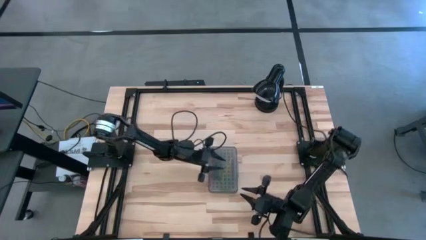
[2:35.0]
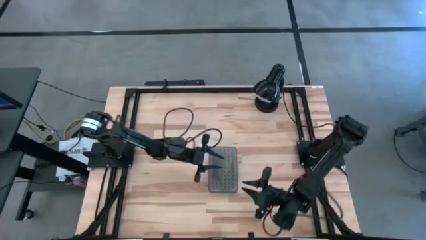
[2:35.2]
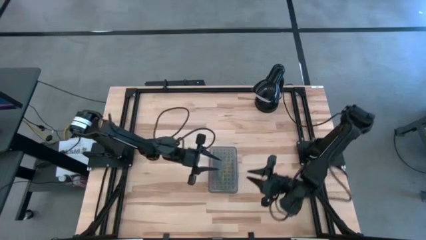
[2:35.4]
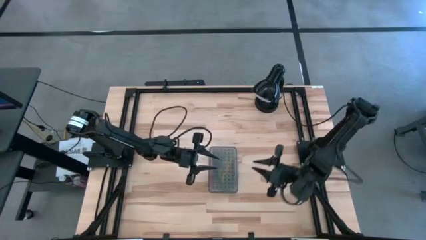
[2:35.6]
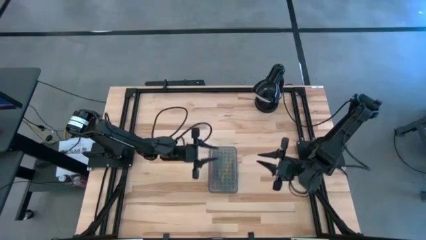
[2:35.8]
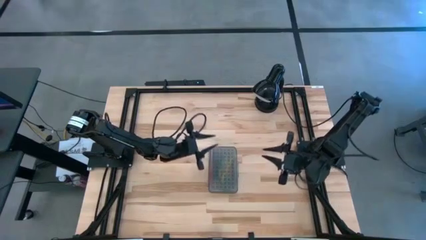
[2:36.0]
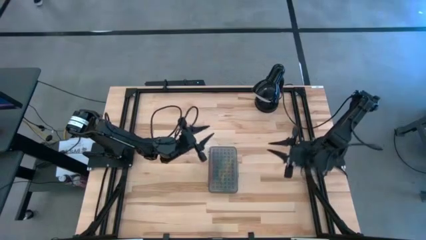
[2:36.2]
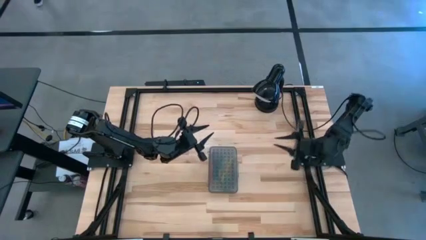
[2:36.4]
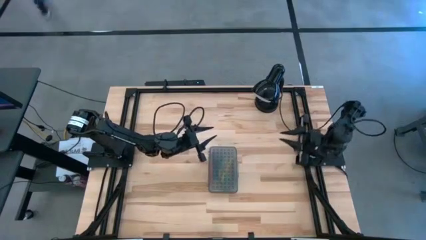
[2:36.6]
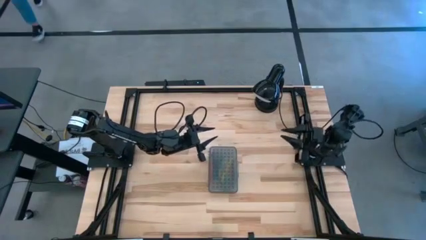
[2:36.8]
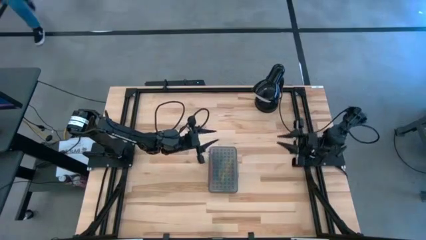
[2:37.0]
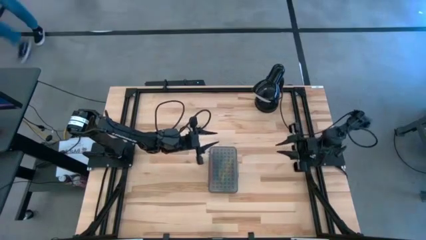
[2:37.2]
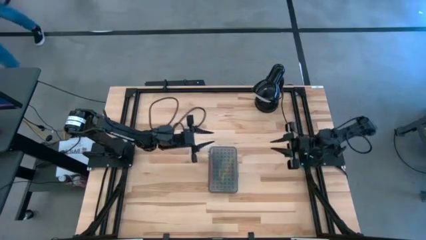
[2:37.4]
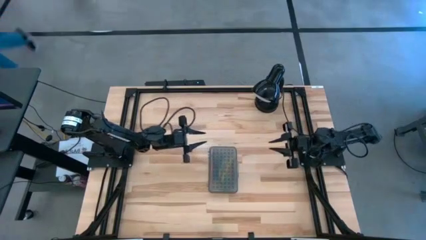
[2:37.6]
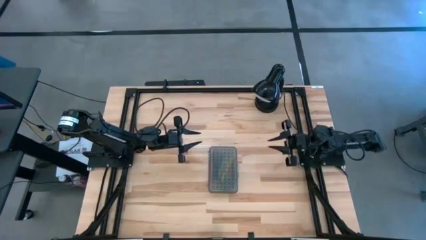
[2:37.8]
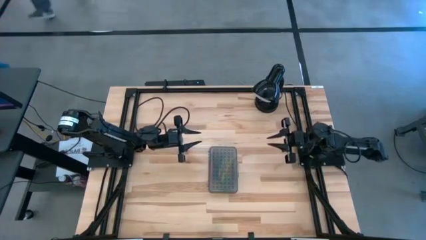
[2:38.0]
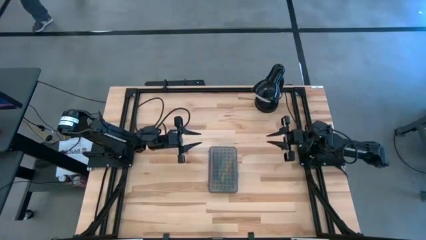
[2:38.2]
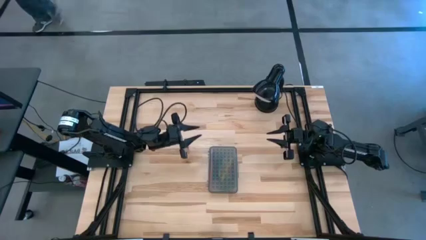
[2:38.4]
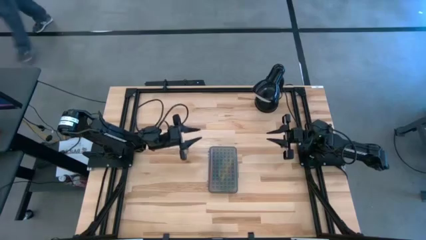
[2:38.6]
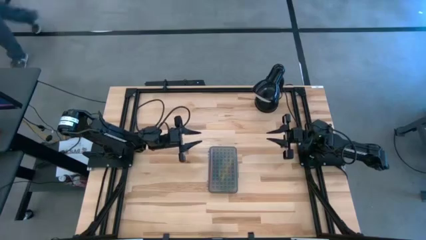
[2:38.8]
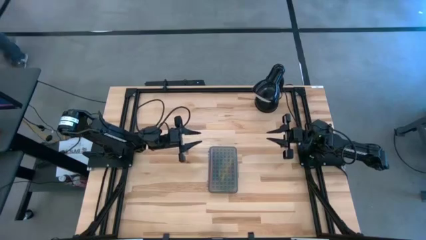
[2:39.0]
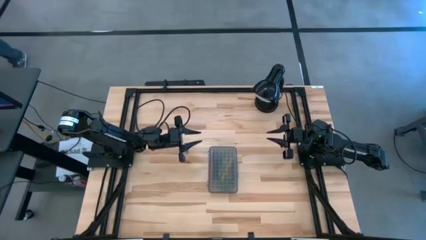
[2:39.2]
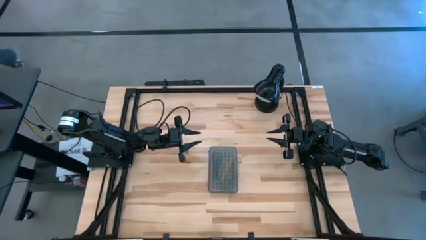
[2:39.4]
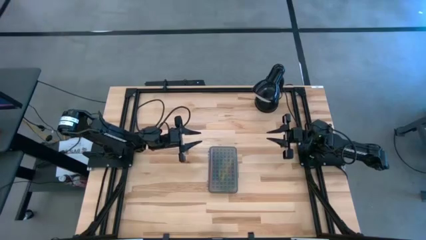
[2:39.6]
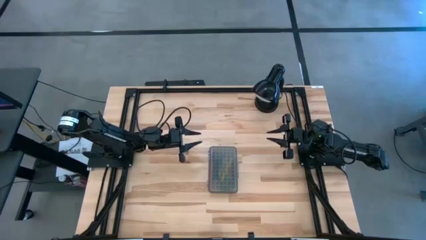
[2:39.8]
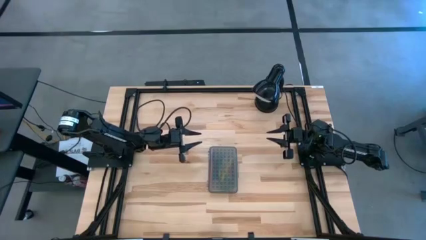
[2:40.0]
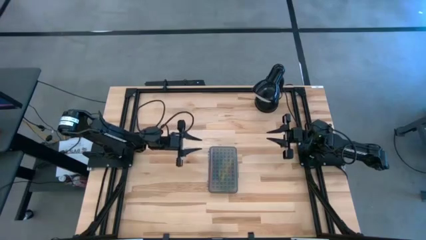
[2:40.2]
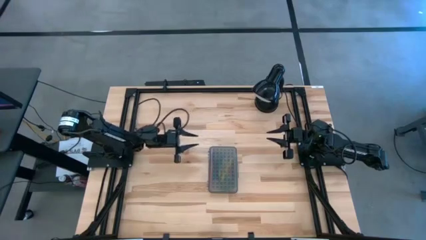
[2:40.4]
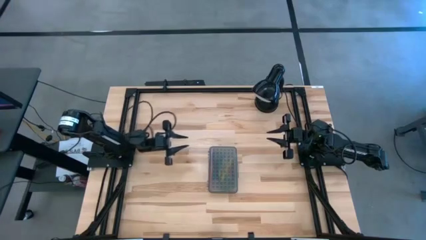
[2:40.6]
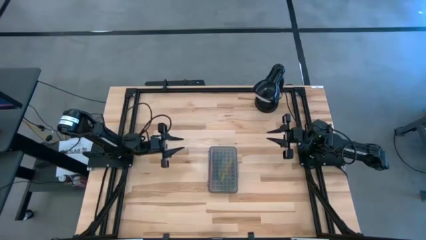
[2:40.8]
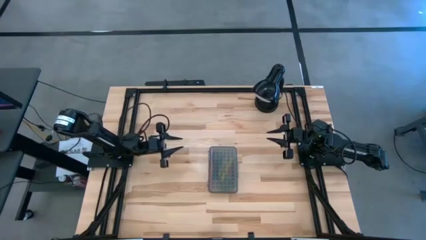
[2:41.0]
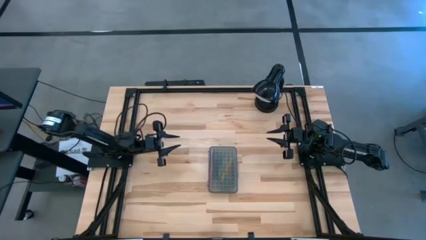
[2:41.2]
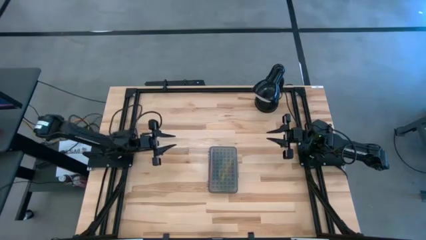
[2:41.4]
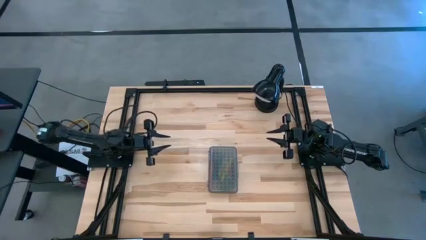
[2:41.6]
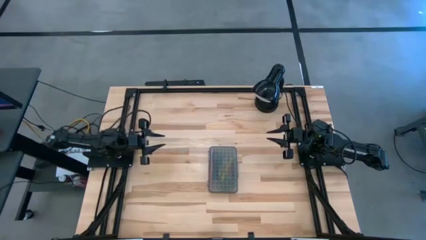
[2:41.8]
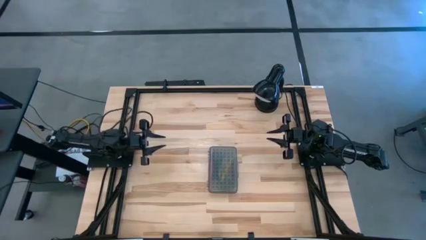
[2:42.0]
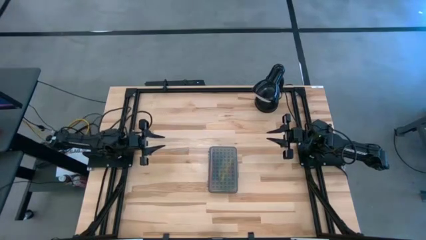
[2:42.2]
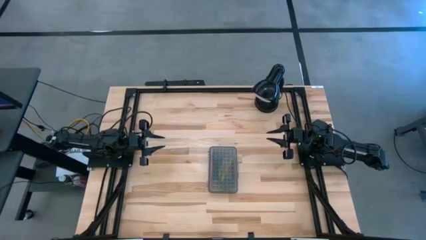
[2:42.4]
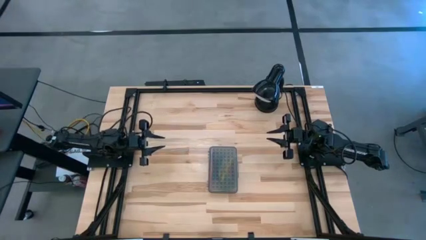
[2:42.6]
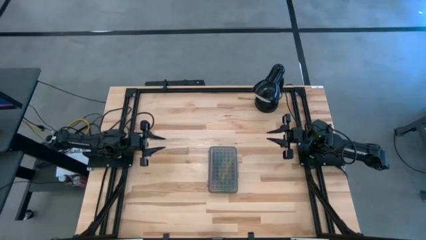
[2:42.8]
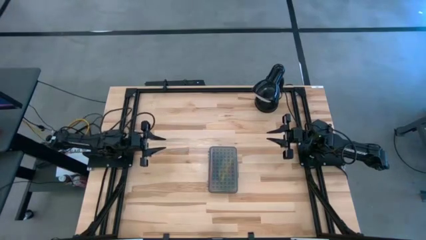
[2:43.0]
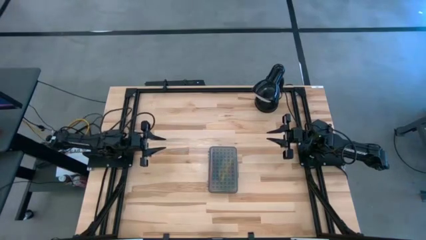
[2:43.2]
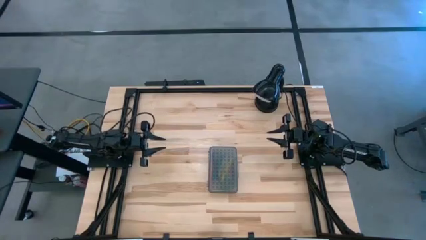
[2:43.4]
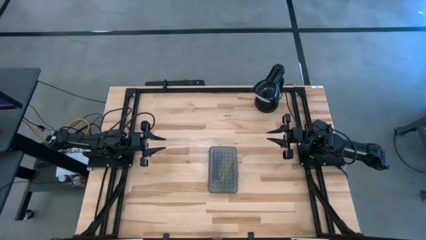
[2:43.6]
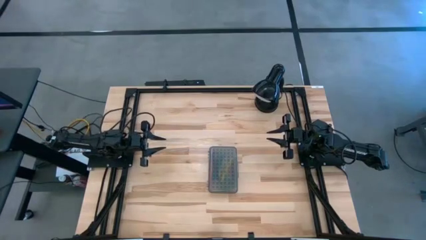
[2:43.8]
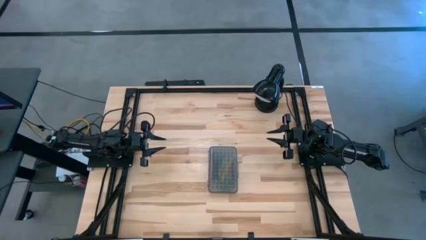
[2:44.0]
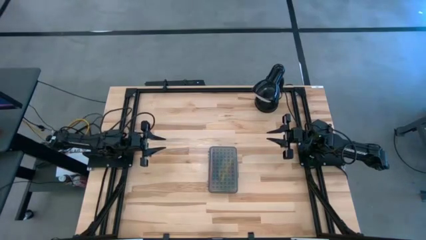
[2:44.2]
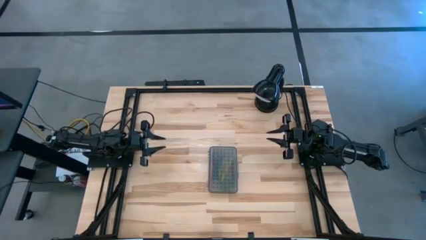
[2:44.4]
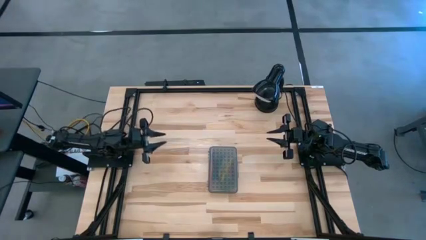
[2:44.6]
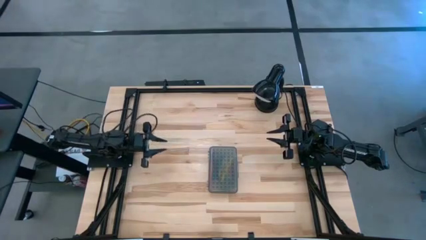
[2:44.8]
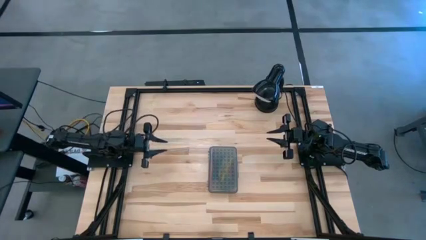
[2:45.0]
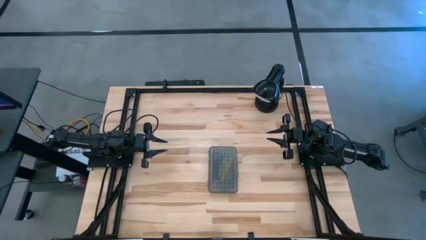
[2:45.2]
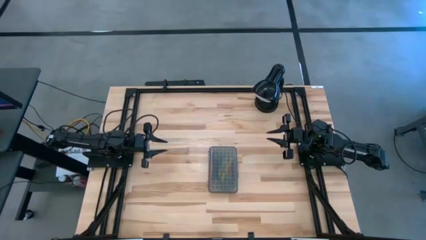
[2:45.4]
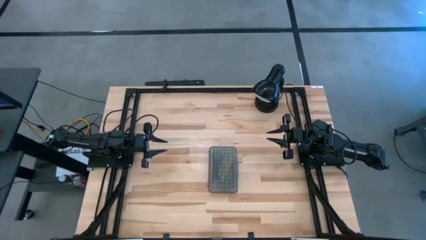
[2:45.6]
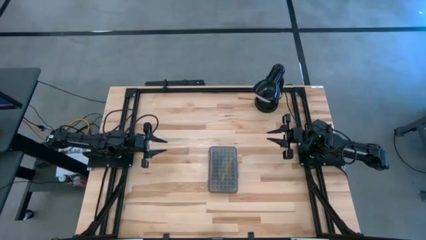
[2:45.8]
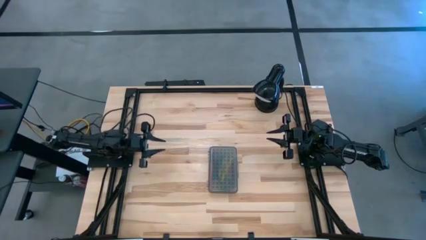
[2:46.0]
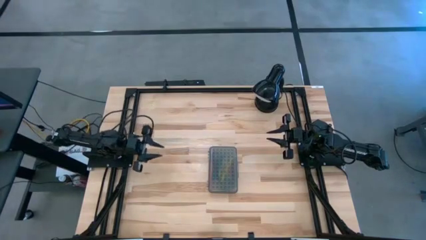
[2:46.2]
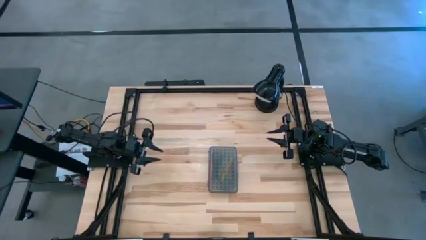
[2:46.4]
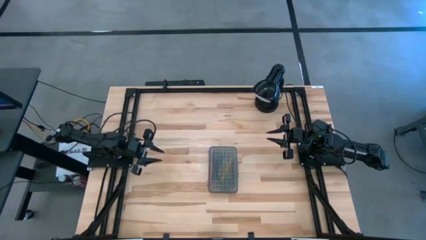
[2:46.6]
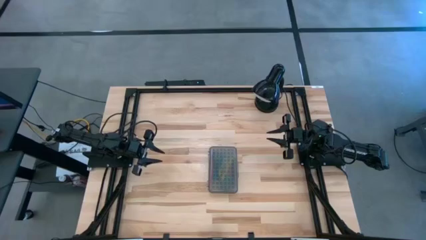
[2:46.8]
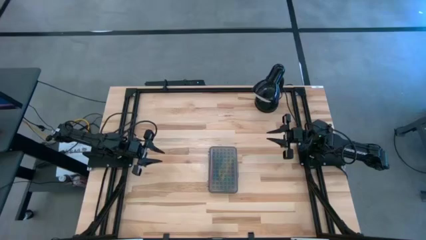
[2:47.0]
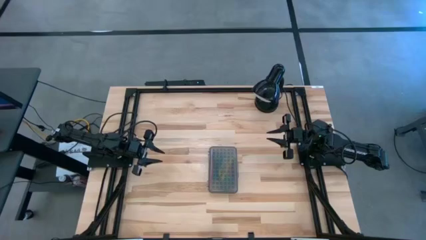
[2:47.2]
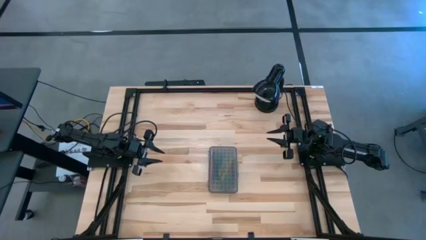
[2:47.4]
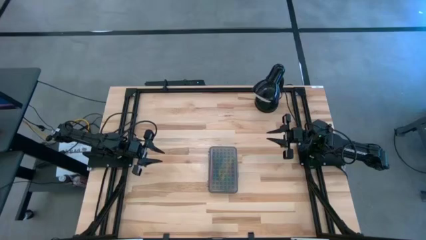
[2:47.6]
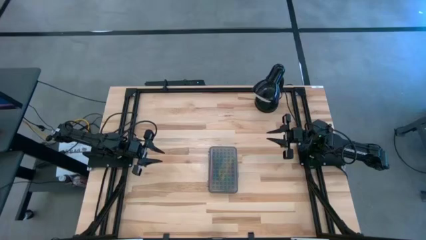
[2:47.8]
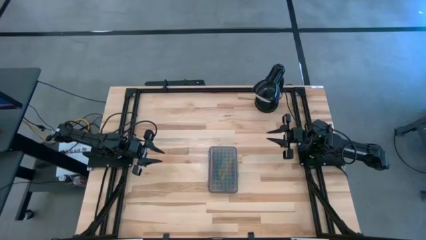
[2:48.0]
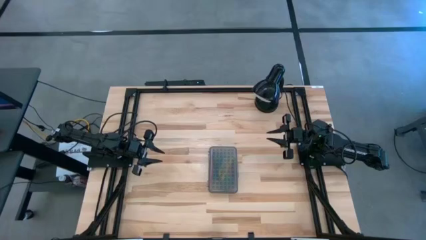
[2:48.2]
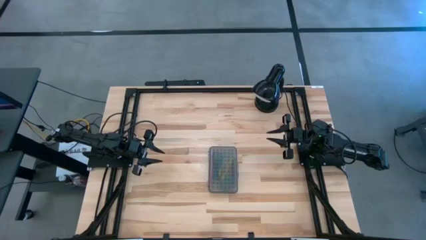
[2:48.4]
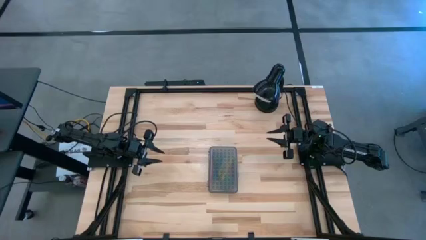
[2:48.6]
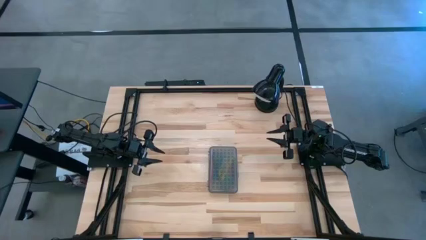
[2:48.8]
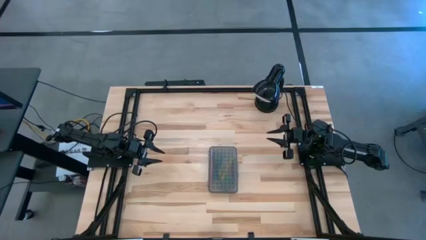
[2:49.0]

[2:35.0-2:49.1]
Task: Pick & place school supplies into a supply box
Return to Home Position
